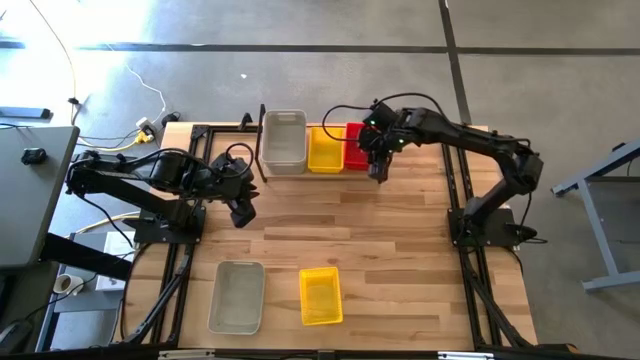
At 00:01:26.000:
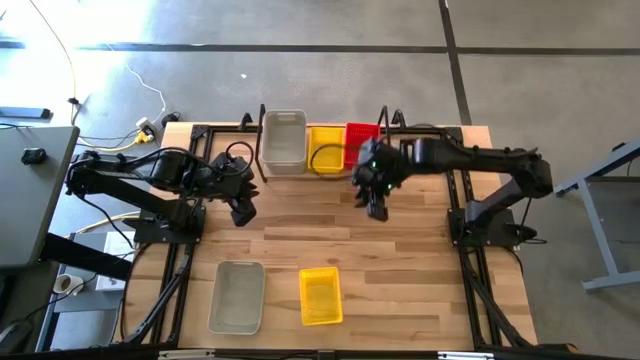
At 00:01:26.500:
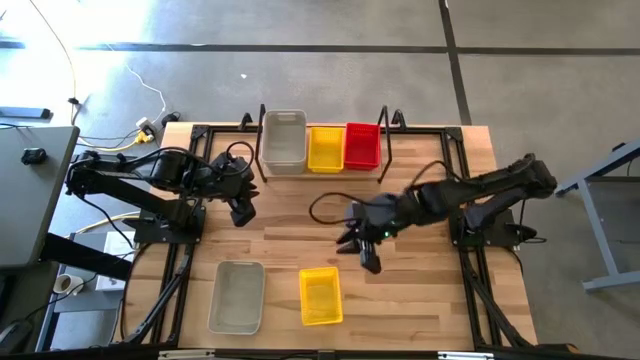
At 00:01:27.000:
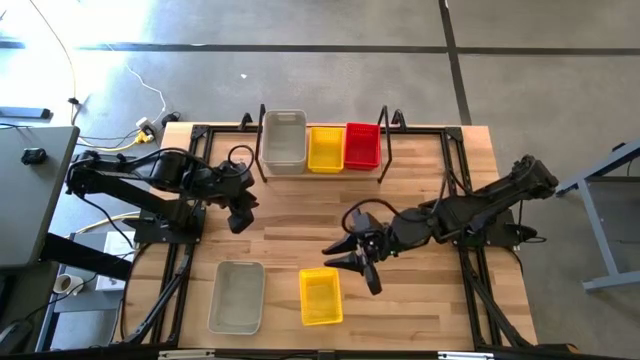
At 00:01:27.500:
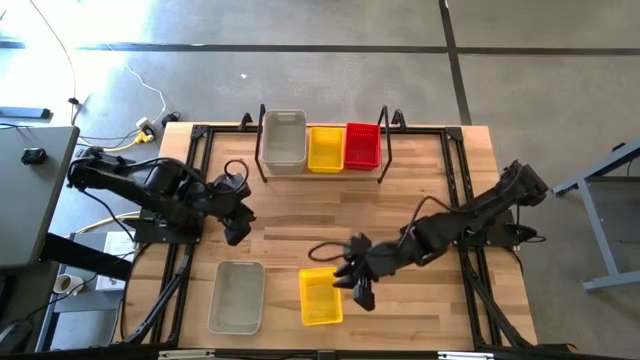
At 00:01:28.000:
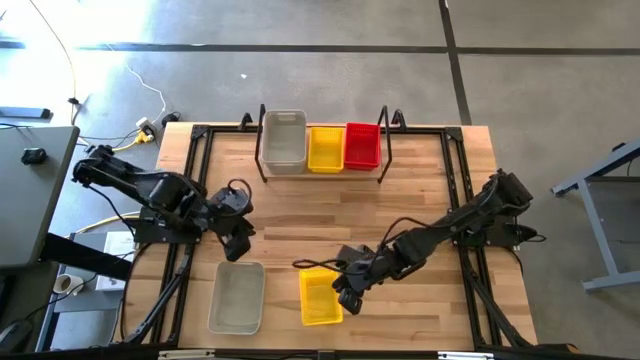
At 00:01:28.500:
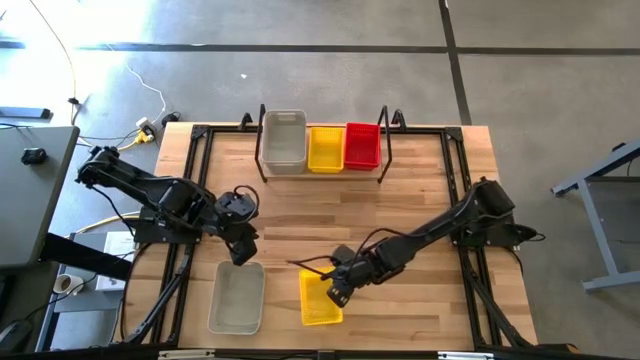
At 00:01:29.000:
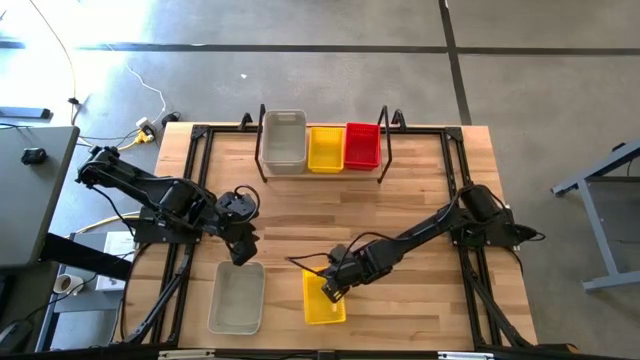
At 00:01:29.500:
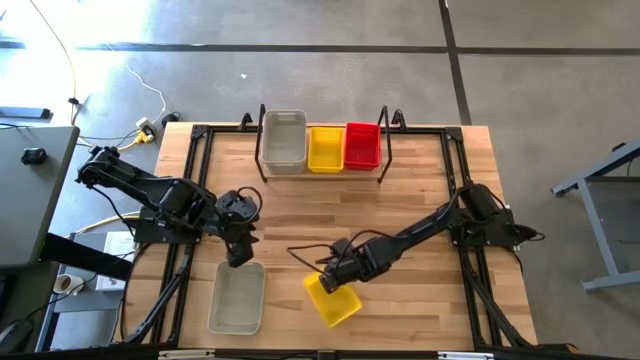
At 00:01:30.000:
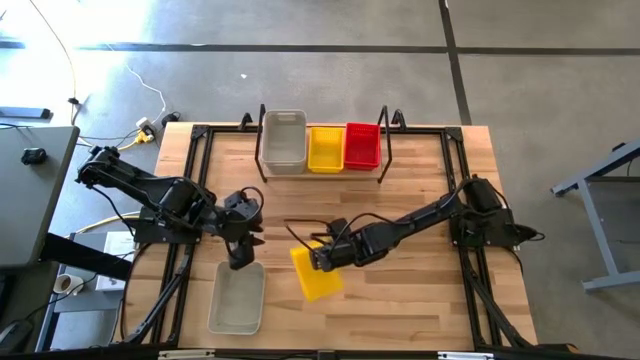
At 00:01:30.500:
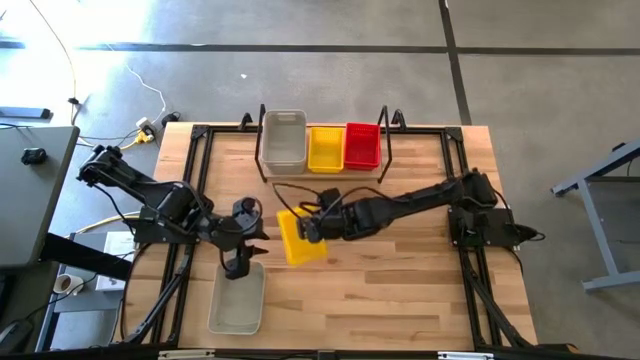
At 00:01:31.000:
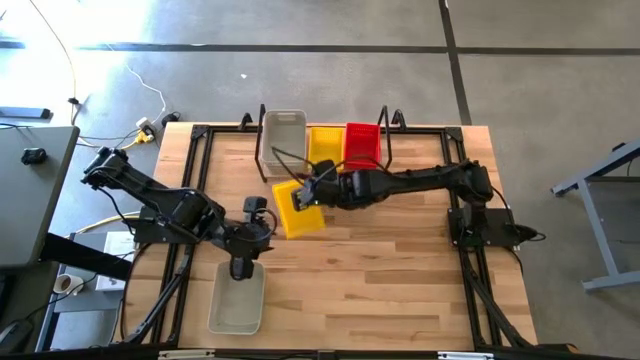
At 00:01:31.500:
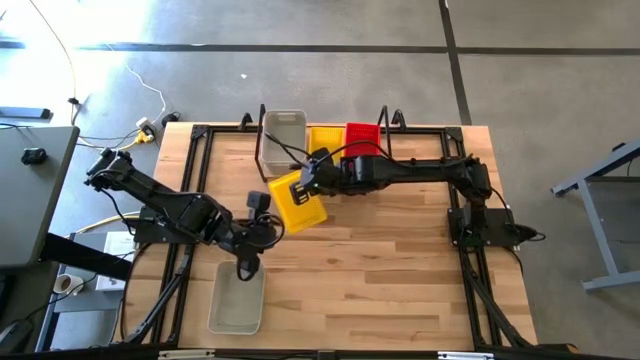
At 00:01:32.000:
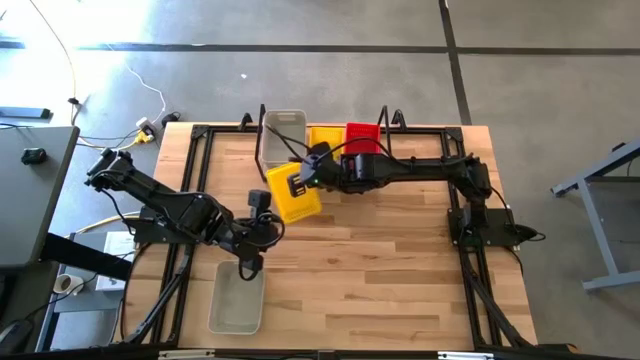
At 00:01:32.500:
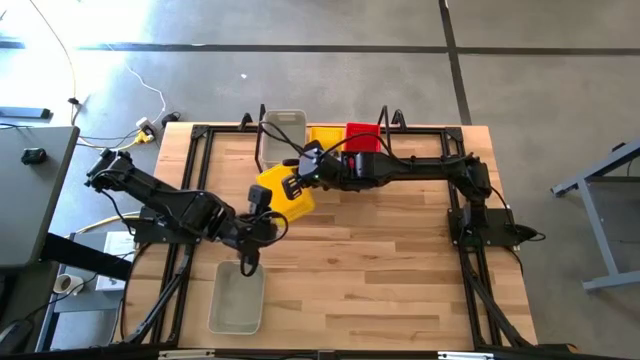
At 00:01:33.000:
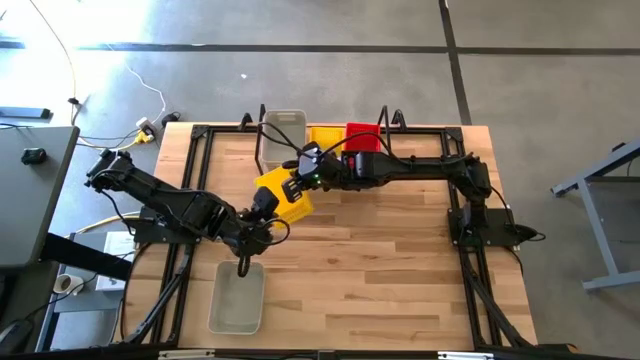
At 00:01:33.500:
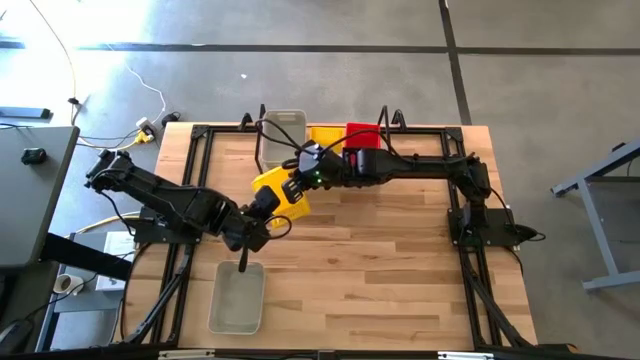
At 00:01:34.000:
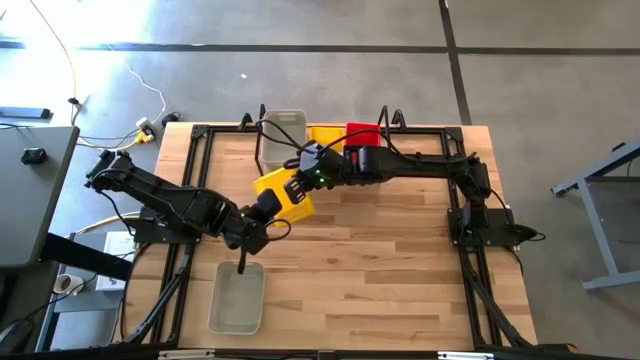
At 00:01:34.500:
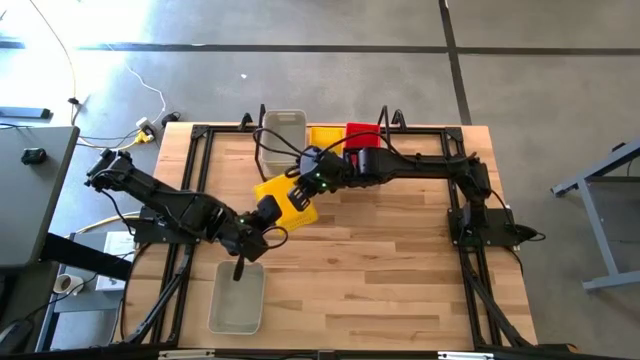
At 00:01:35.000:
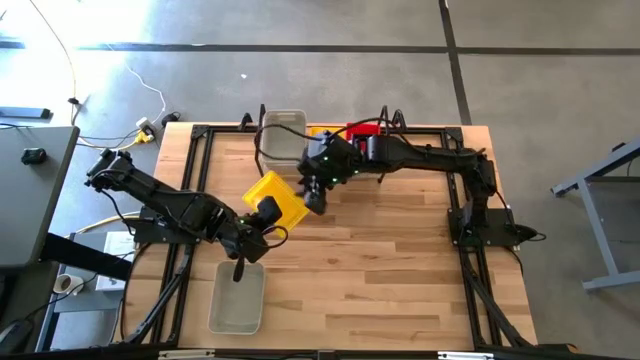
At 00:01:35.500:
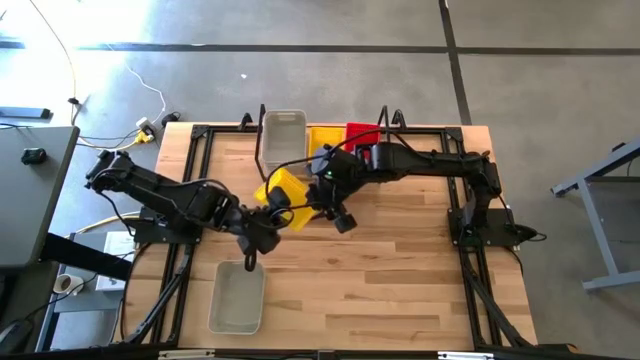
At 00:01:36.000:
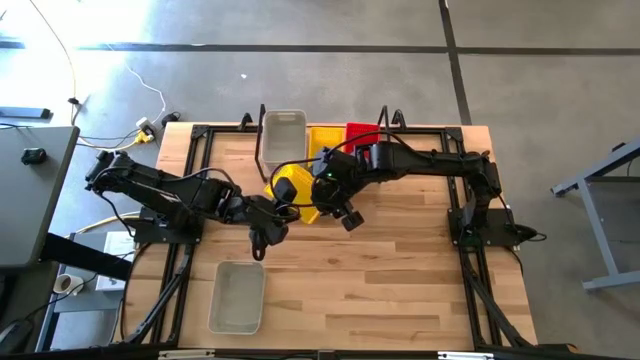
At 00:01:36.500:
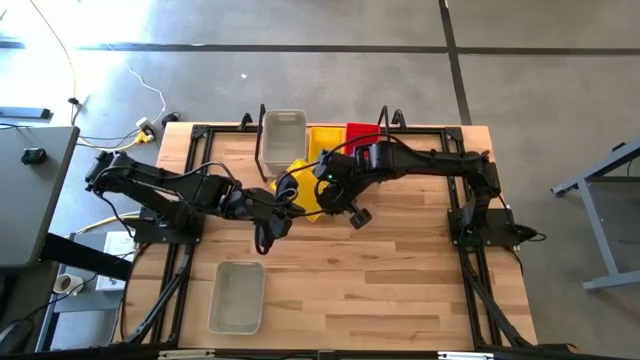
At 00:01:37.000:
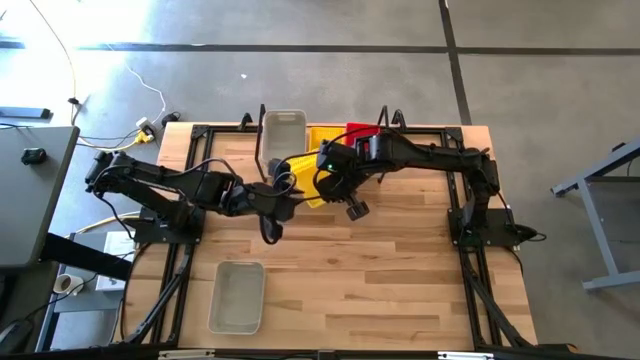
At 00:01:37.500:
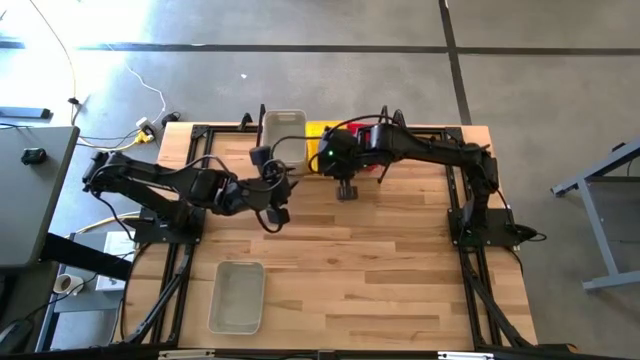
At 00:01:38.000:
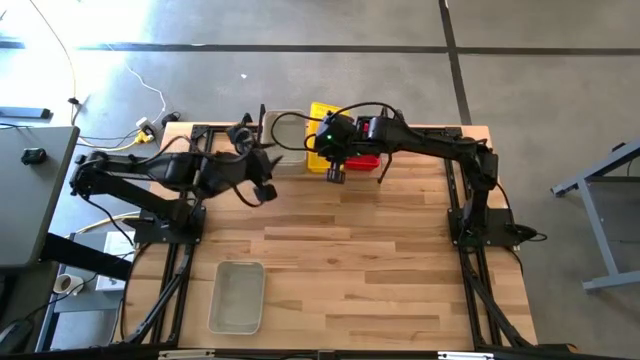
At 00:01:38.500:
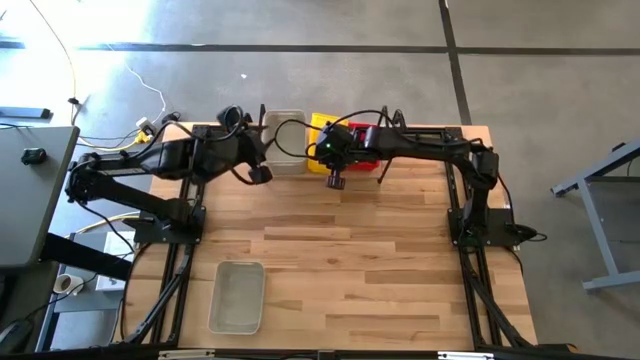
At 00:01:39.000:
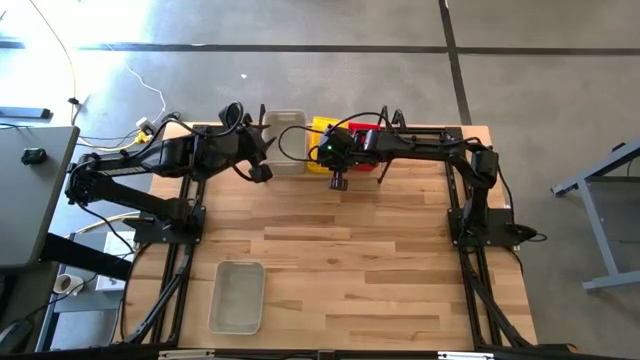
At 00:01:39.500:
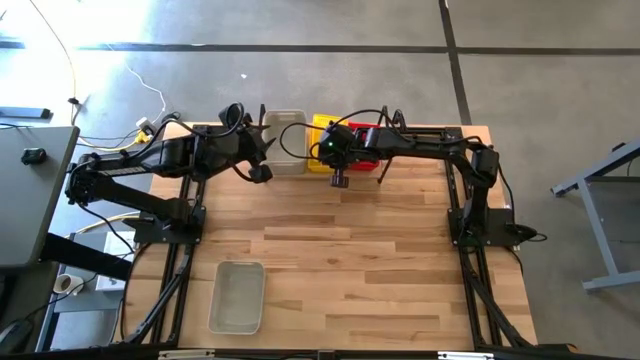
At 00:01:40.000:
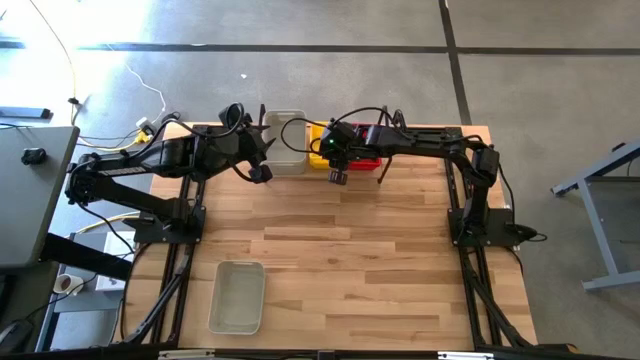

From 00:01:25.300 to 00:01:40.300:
Task: Stack baskets on shelf by color
Stack the yellow bin on the yellow bins on the shelf

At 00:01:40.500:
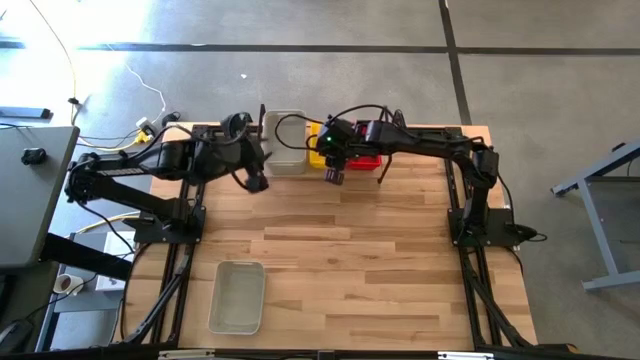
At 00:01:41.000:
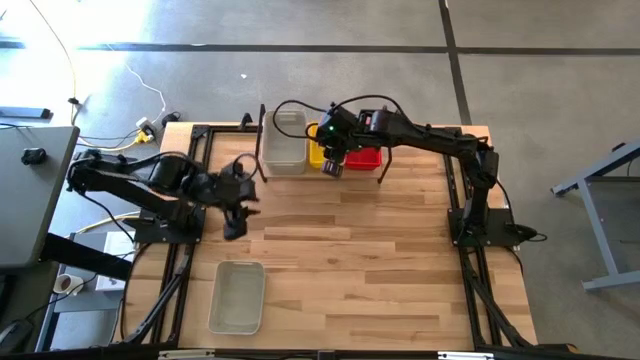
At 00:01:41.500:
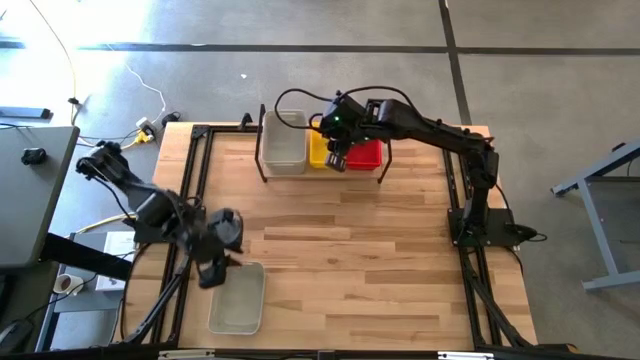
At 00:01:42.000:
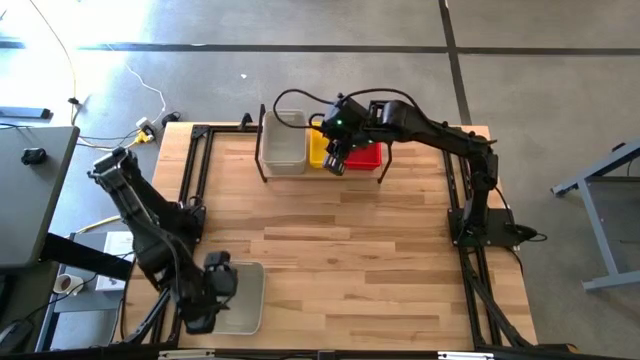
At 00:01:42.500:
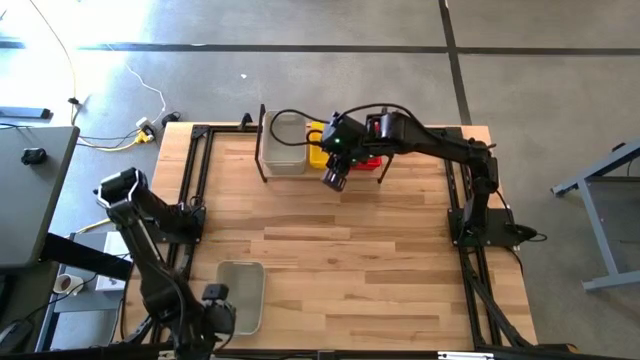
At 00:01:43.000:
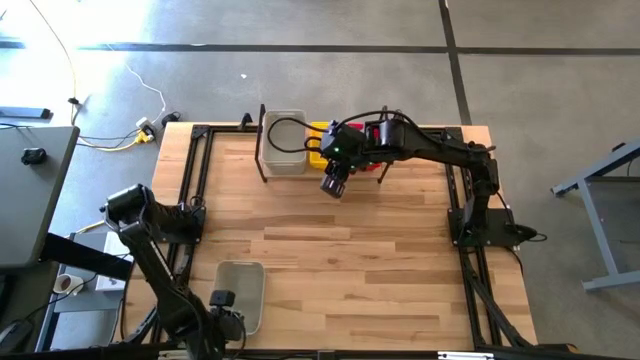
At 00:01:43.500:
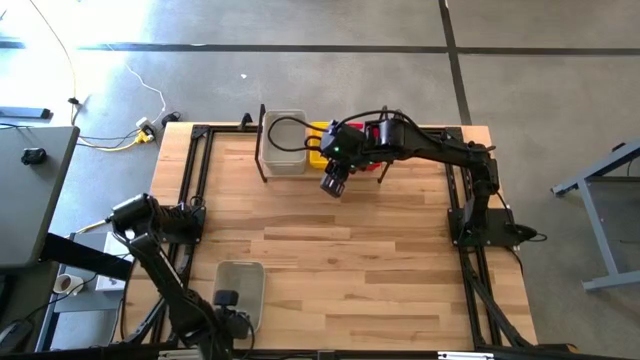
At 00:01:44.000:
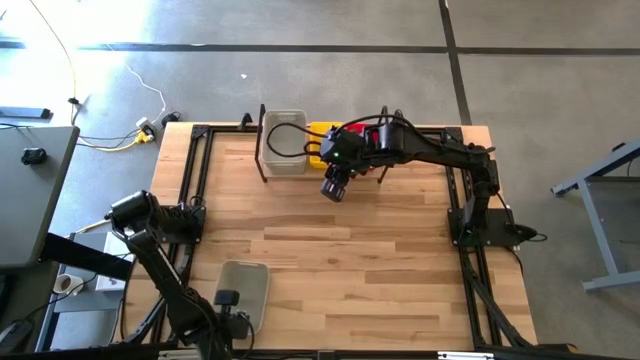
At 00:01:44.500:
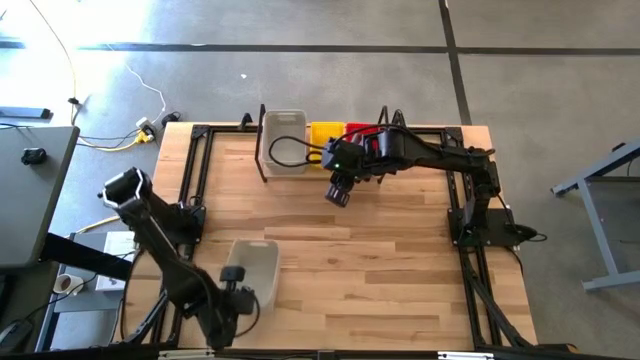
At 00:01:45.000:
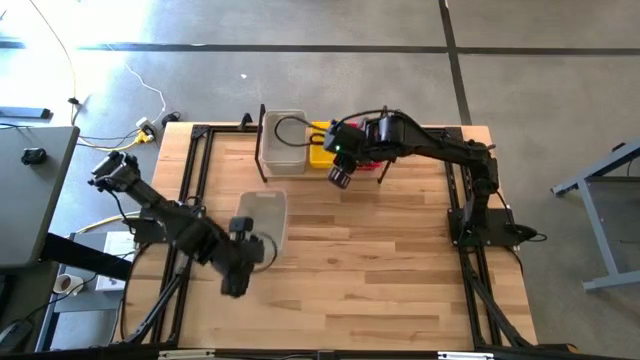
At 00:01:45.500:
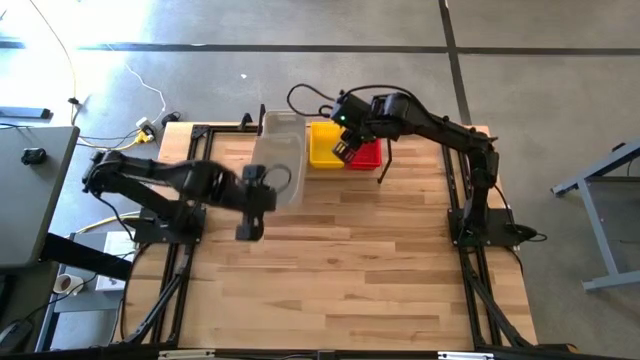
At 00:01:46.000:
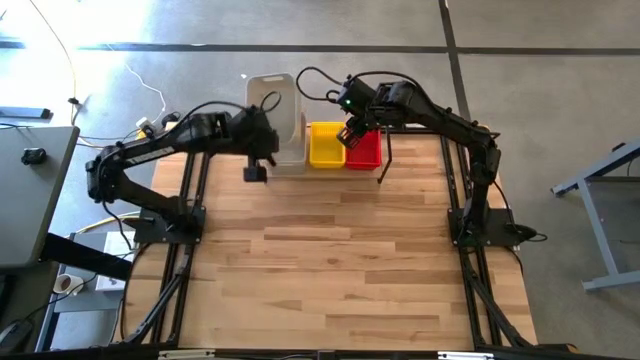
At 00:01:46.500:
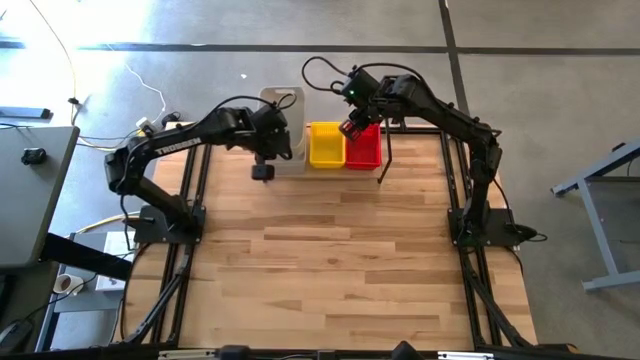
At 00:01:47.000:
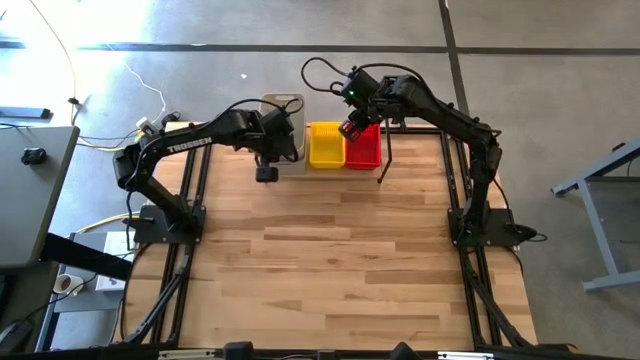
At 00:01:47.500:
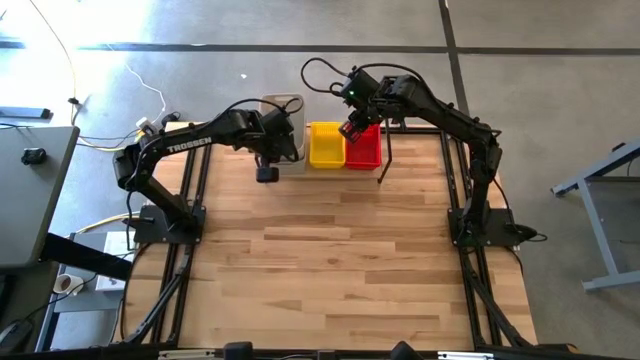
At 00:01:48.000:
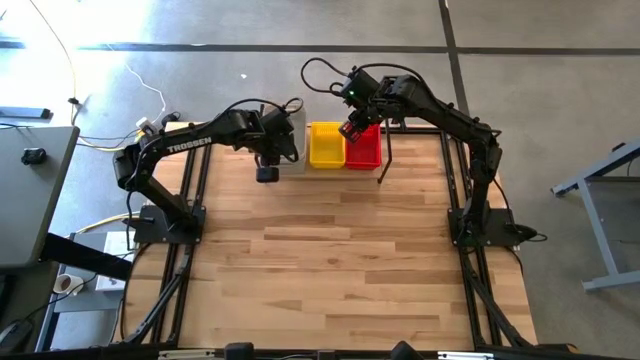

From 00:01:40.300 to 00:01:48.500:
Stack the gray bin on the gray bins on the shelf
